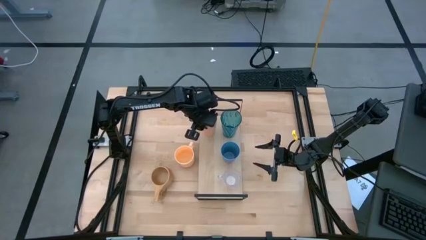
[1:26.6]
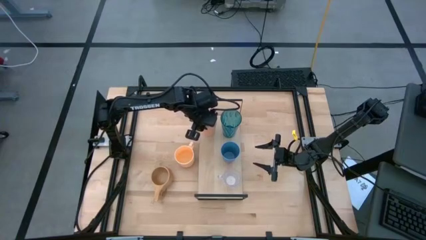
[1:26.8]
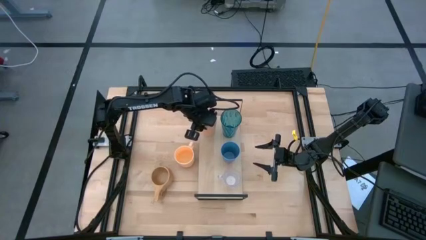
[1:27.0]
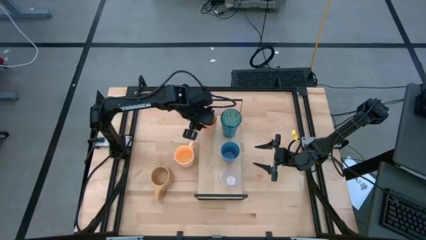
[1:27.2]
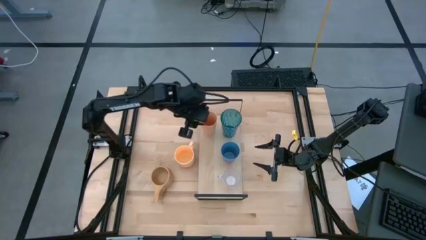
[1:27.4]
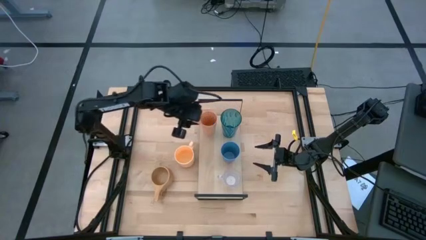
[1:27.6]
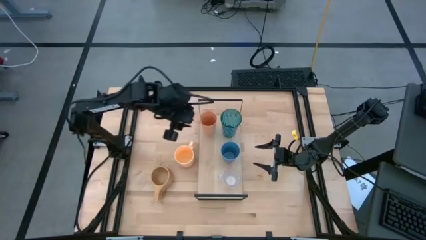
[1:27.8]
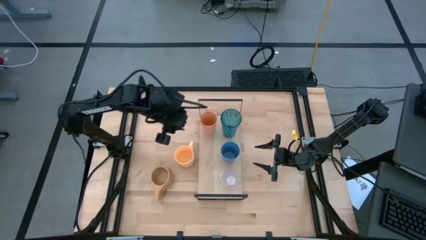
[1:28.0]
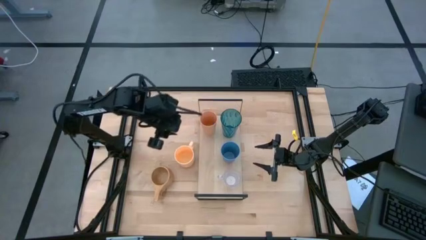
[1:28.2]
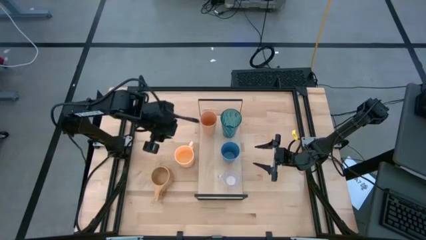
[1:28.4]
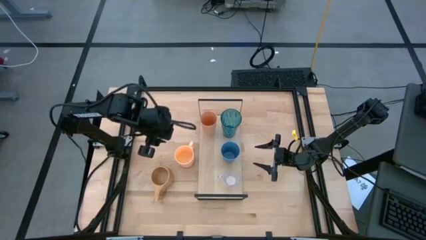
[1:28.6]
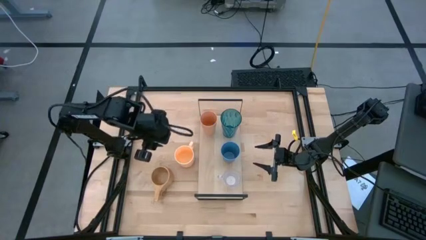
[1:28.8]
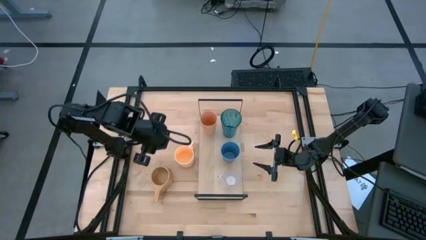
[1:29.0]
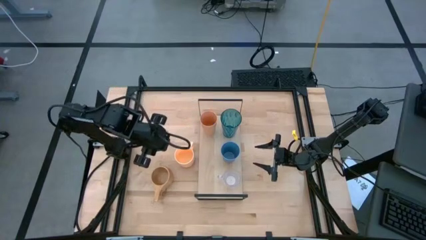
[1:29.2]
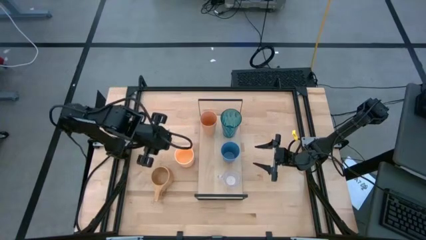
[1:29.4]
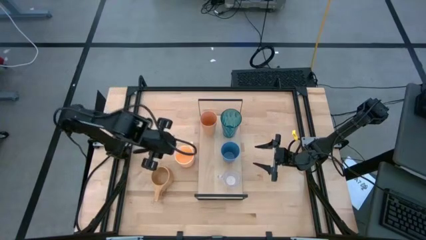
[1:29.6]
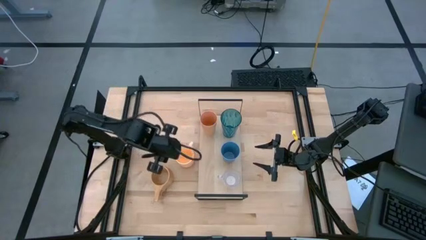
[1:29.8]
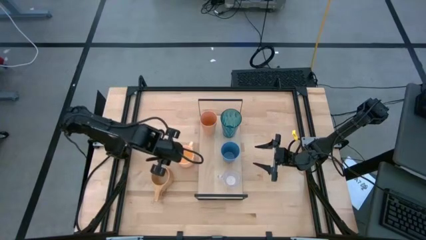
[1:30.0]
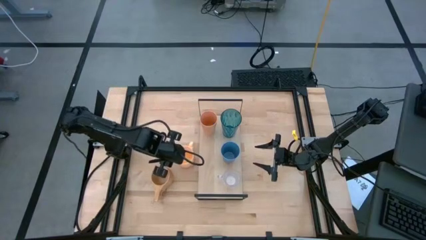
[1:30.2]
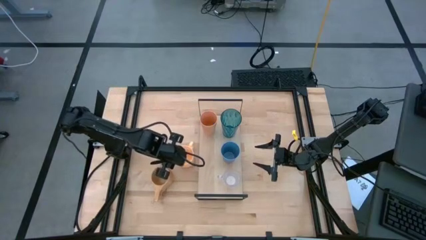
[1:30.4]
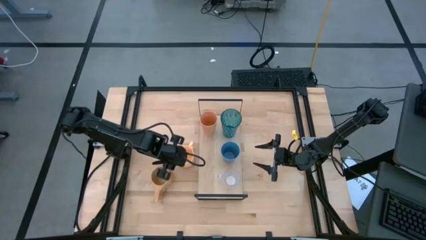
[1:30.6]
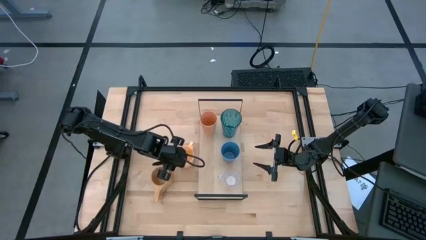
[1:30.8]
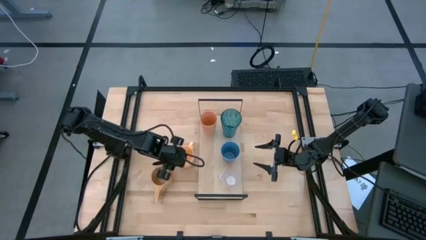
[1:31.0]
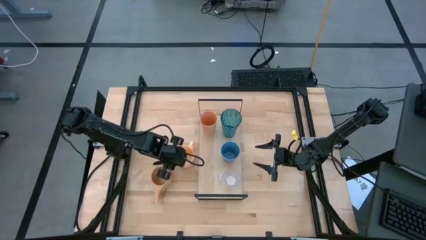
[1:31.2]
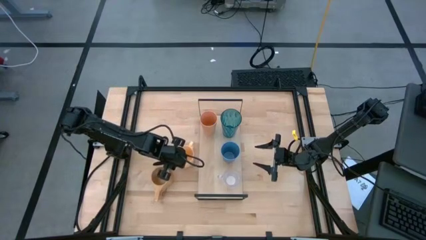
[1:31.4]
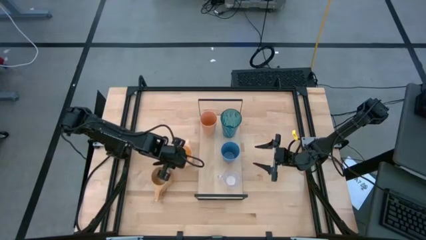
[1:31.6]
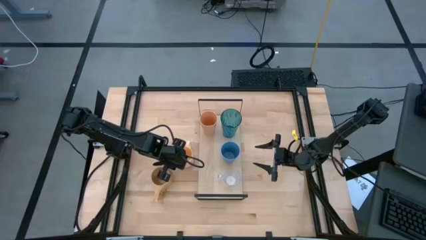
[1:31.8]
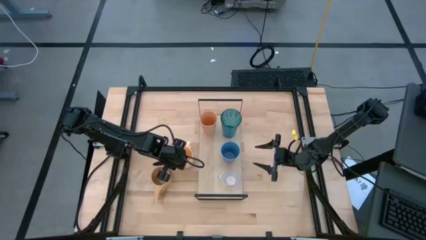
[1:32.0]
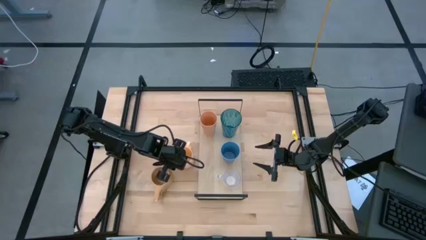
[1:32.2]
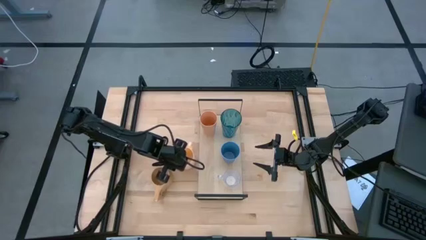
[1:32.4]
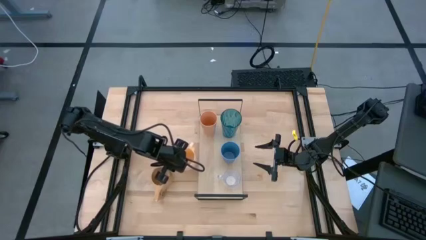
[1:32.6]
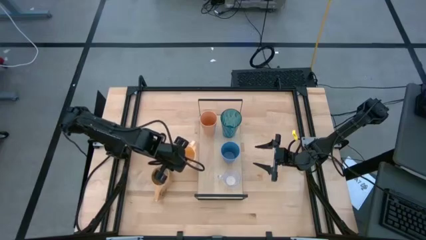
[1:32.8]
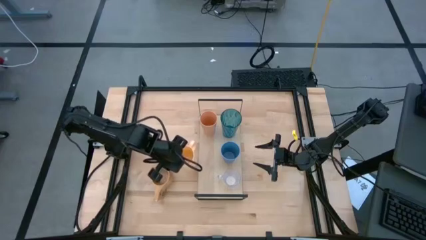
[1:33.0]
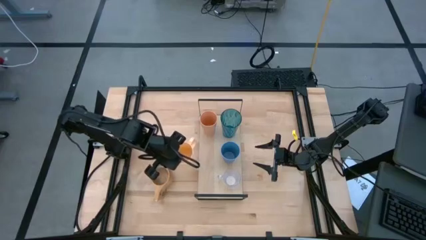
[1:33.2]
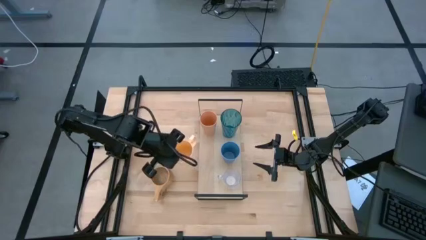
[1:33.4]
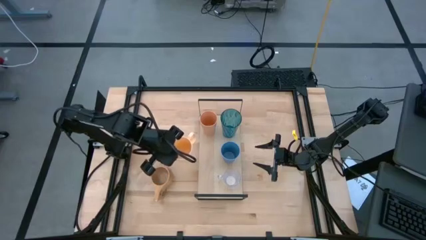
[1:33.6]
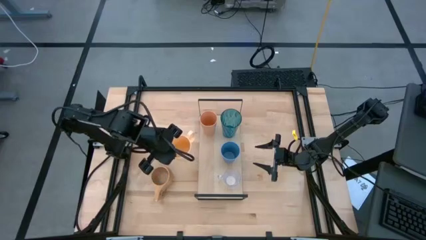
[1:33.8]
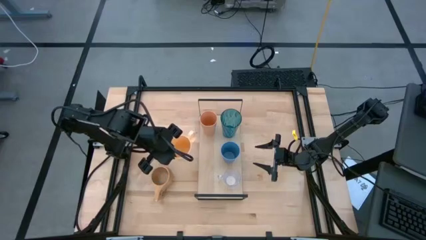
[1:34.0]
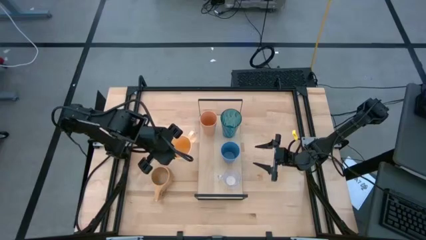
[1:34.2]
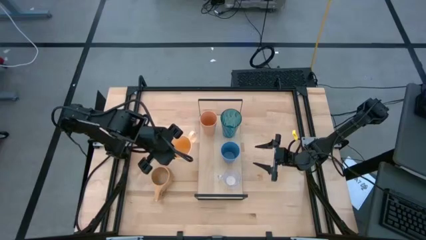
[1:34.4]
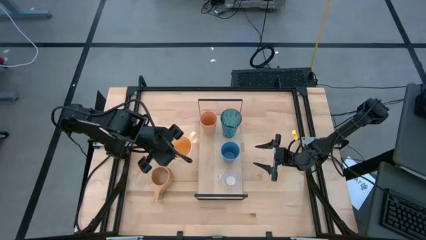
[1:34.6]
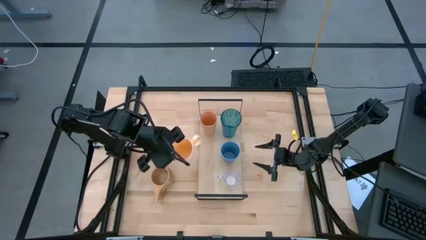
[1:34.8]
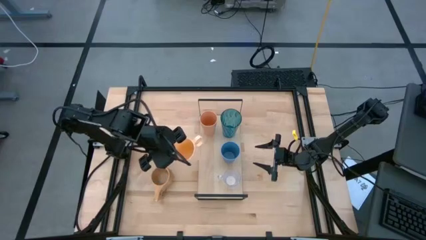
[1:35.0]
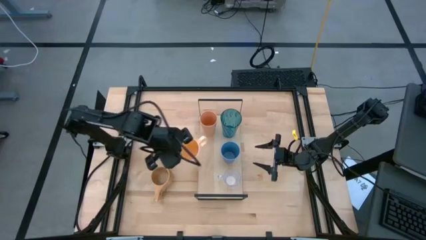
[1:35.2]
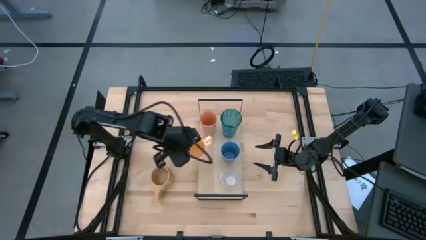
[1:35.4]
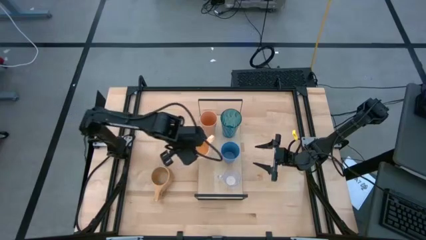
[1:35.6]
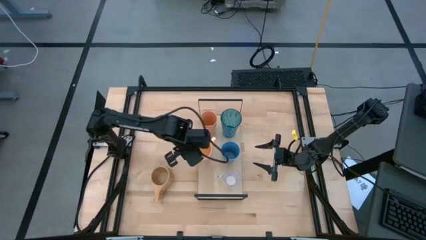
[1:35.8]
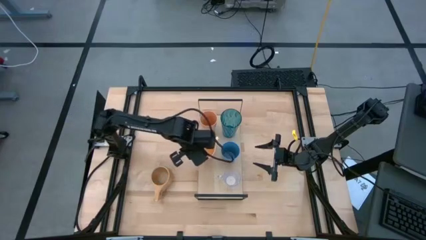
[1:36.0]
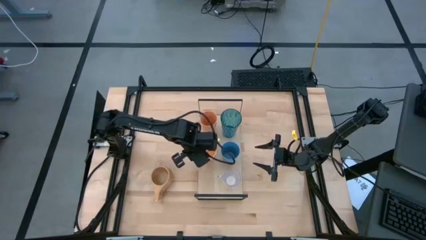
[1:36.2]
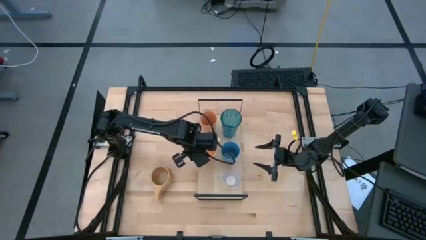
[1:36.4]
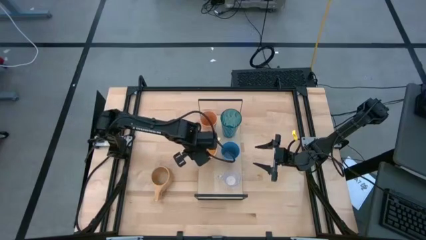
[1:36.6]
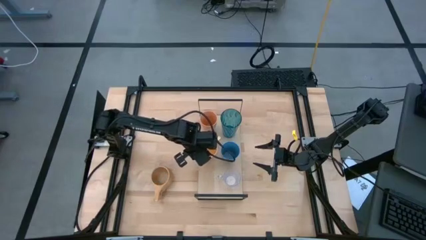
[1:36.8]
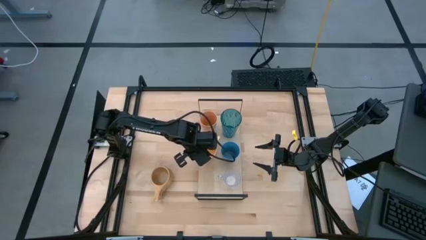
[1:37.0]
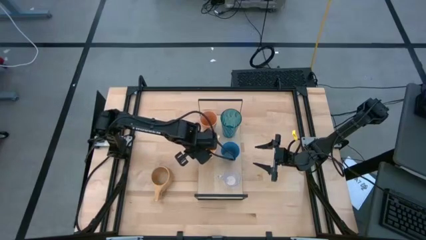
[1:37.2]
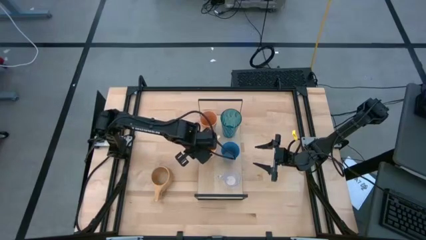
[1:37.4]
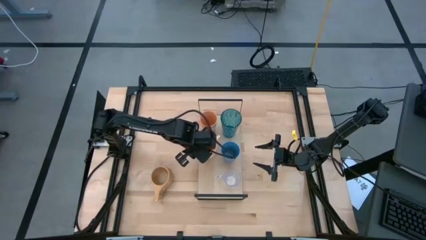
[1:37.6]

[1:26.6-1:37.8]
Task: Stack small to large cups/mugs on shelf
Put the light orange mug on the shelf

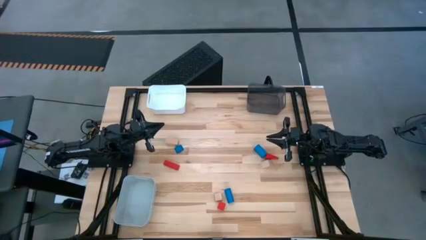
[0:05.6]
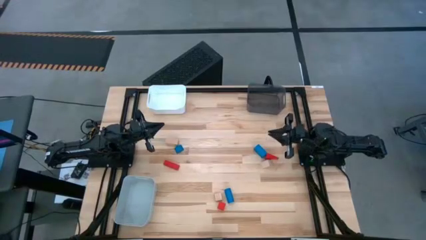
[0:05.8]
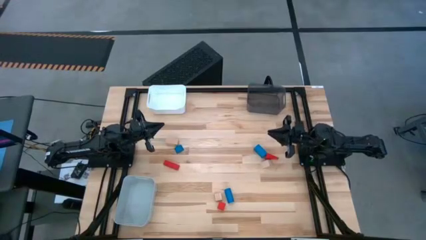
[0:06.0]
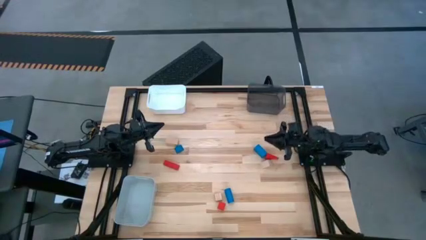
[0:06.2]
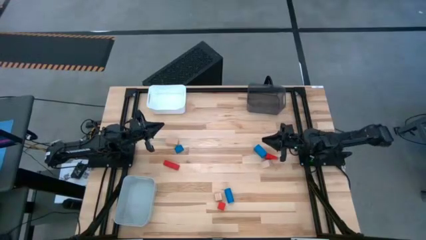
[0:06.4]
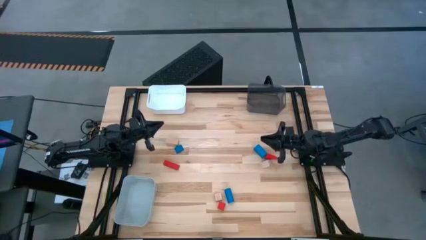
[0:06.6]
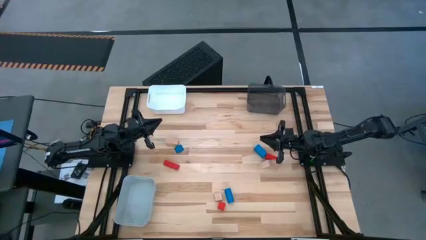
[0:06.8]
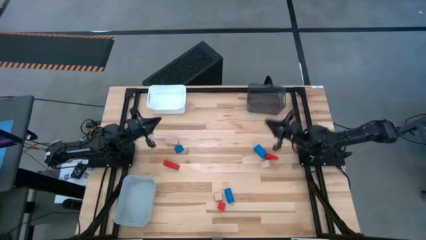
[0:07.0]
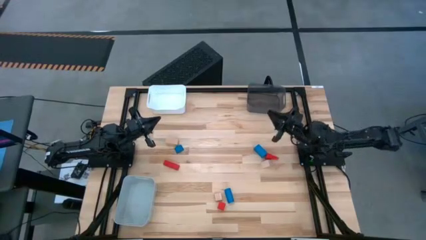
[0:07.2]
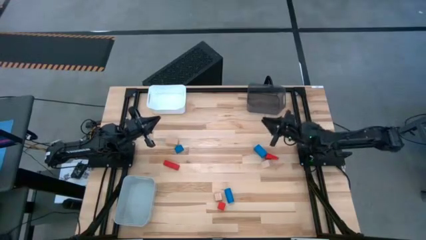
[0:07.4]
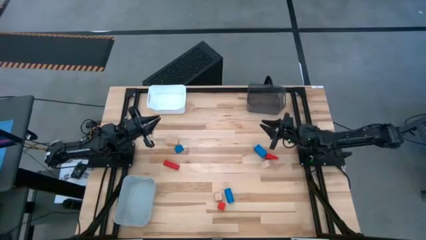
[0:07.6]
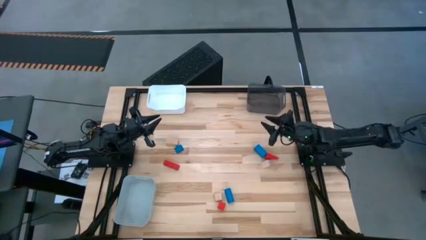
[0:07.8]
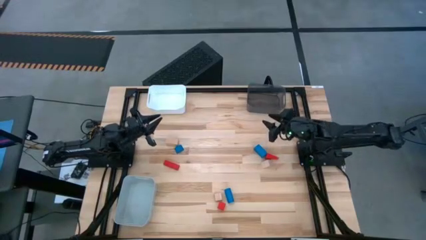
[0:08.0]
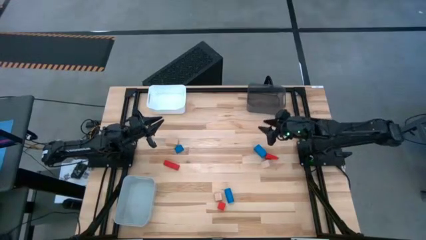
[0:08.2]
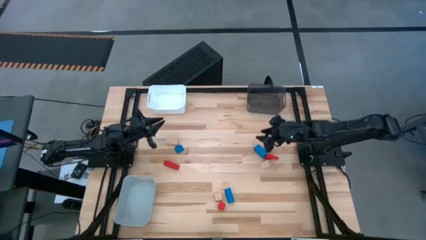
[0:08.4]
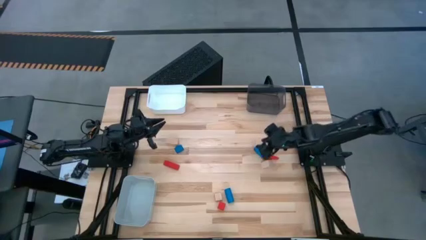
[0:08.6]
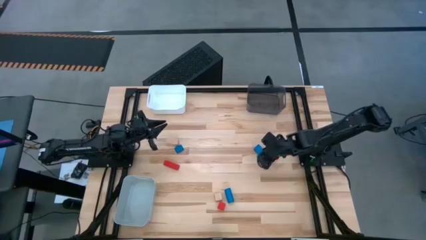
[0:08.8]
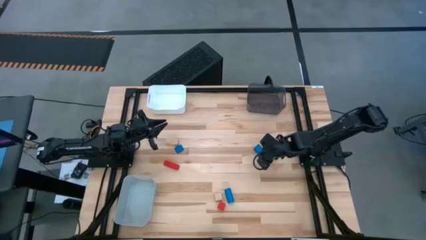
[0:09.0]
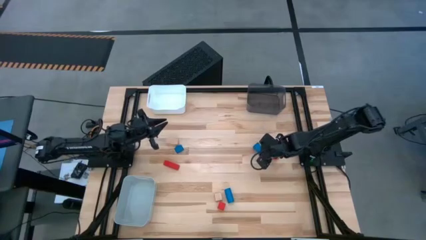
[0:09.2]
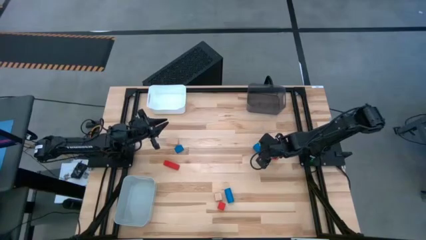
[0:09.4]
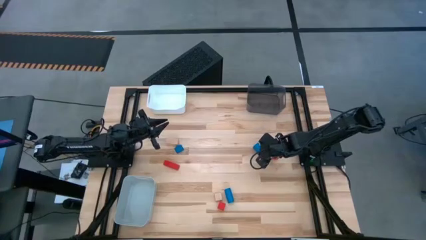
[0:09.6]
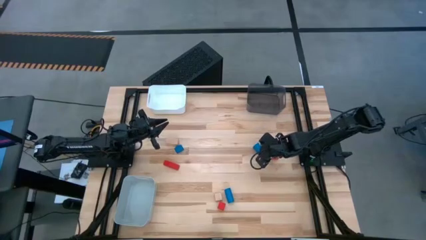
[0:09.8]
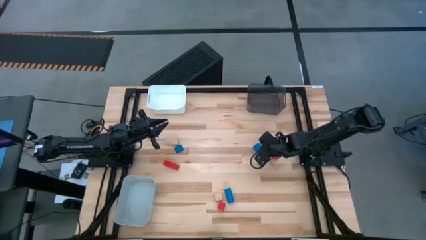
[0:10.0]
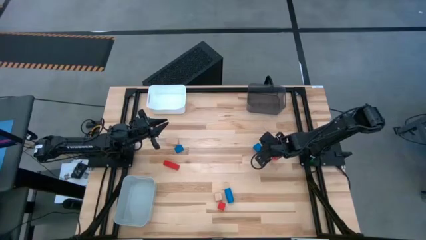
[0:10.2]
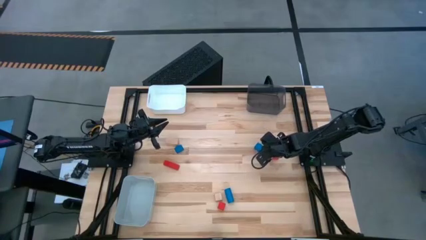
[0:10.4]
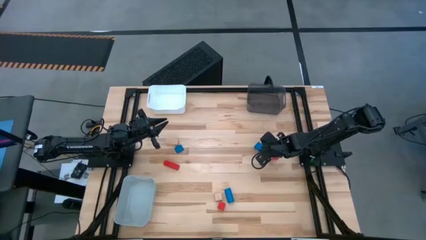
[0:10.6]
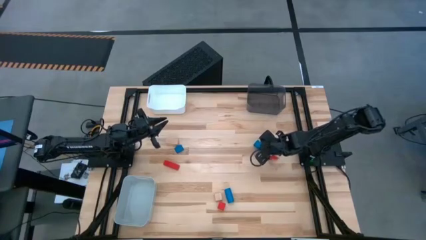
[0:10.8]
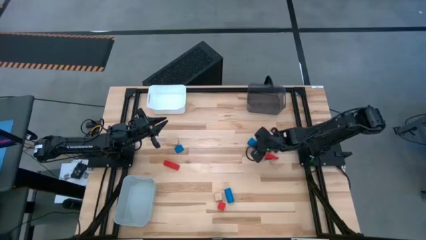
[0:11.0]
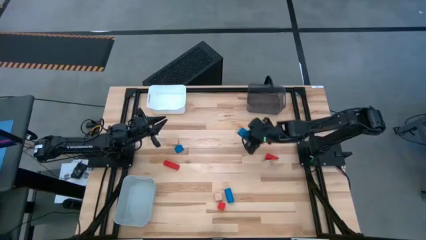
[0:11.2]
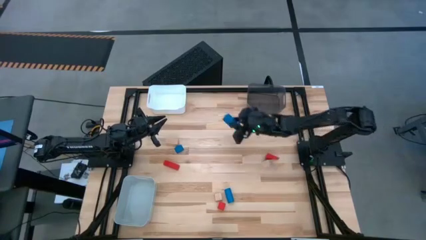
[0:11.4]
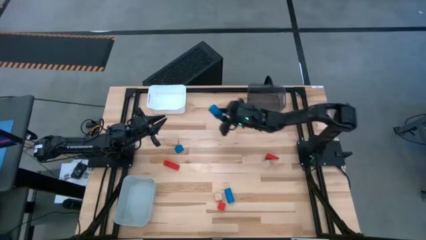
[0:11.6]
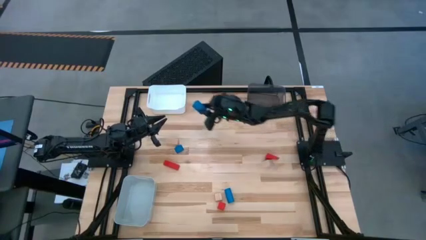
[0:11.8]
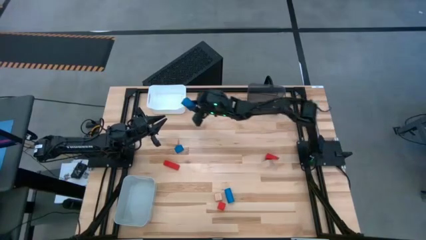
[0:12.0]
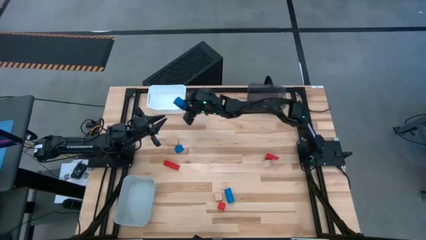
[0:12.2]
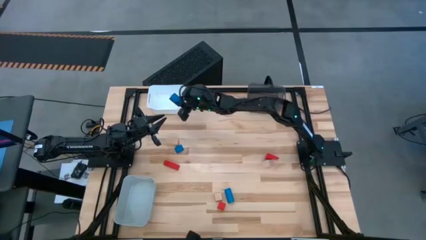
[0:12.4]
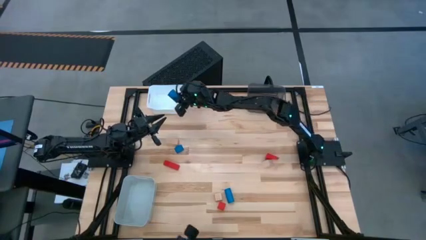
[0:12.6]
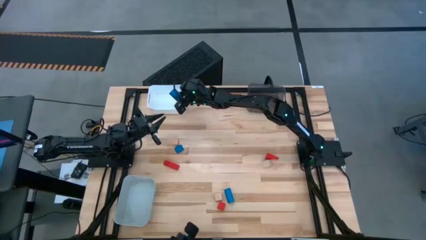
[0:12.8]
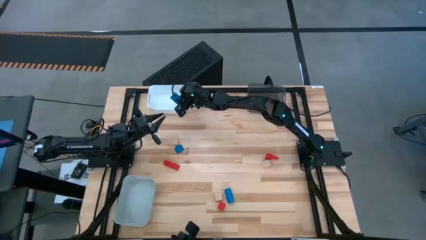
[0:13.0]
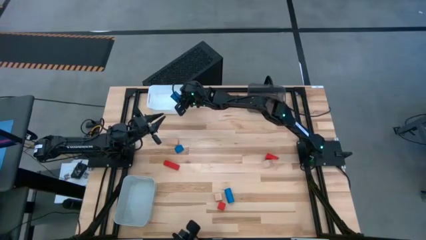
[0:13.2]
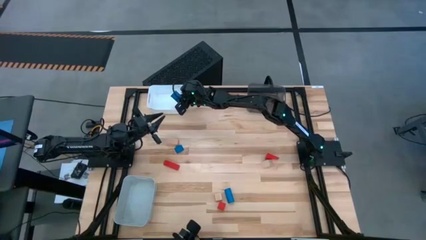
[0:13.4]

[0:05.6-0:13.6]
Task: Sort & place blocks by color
Put the top right blue block into the white bin
